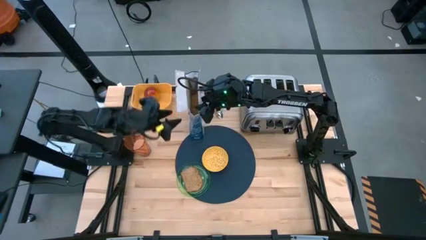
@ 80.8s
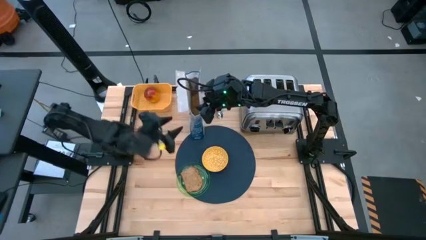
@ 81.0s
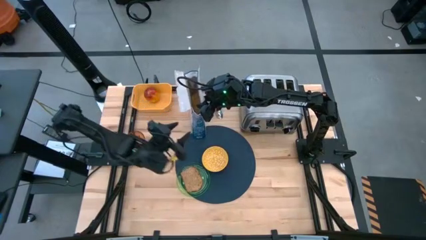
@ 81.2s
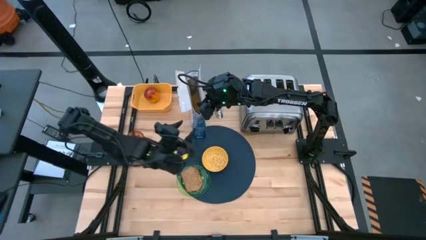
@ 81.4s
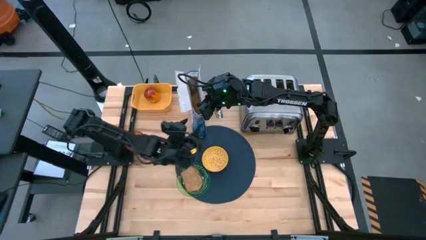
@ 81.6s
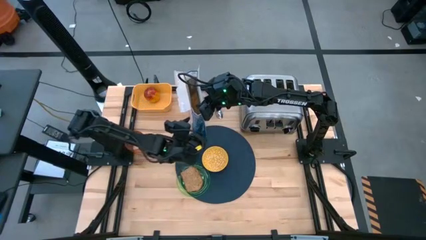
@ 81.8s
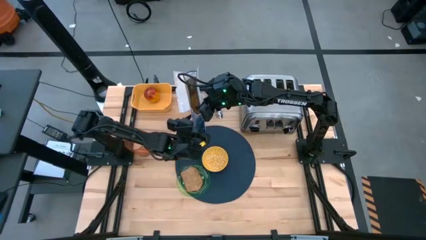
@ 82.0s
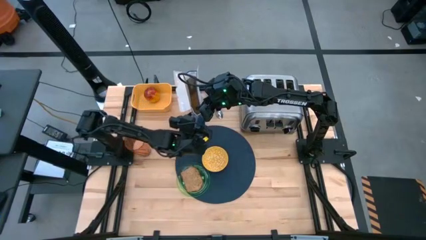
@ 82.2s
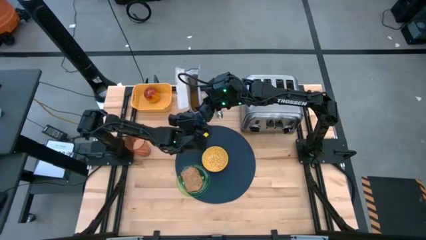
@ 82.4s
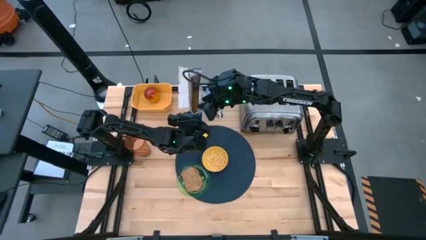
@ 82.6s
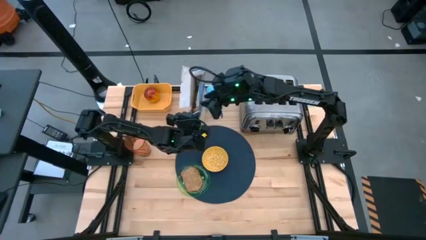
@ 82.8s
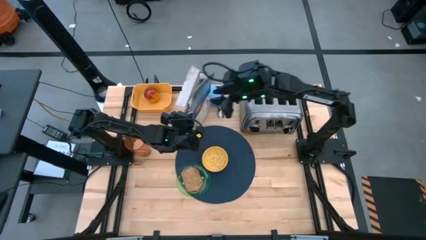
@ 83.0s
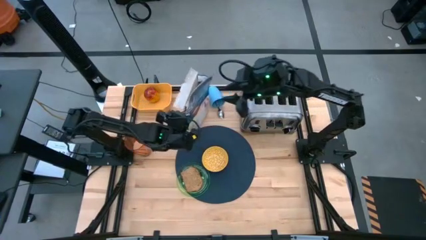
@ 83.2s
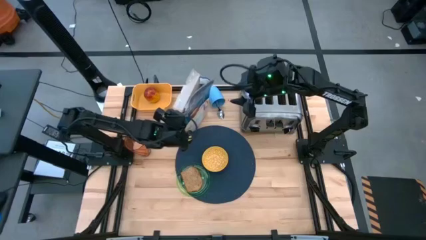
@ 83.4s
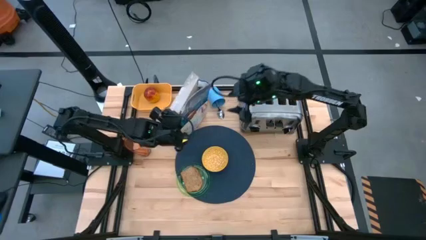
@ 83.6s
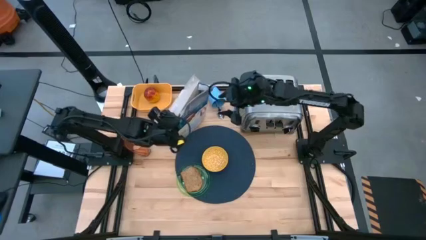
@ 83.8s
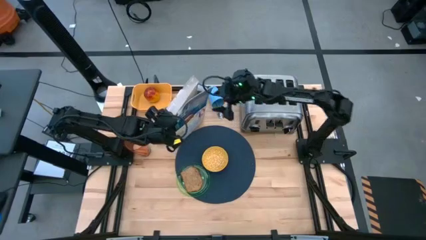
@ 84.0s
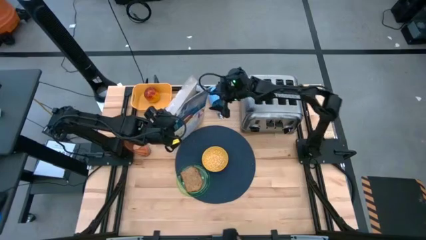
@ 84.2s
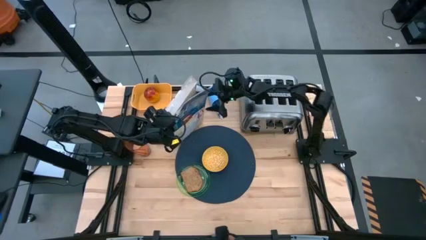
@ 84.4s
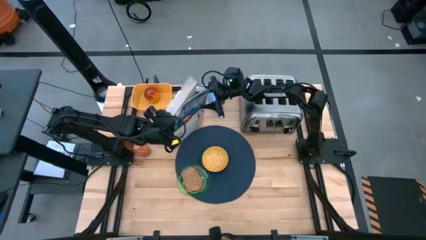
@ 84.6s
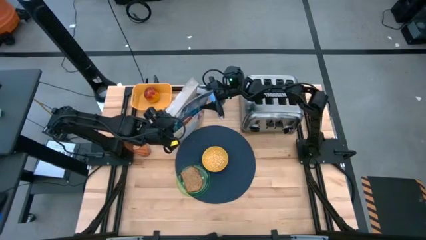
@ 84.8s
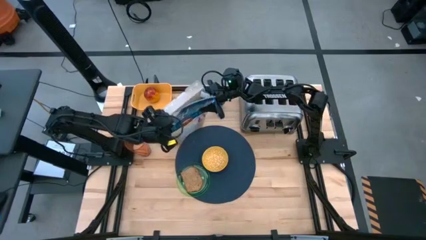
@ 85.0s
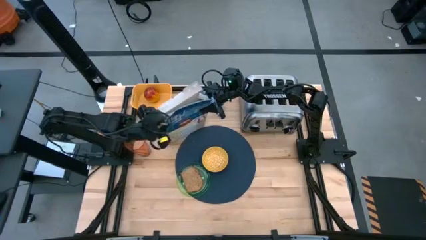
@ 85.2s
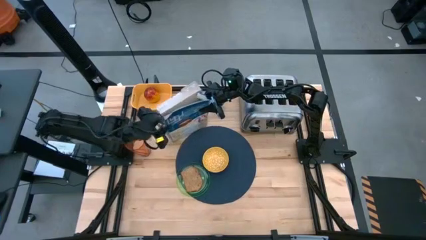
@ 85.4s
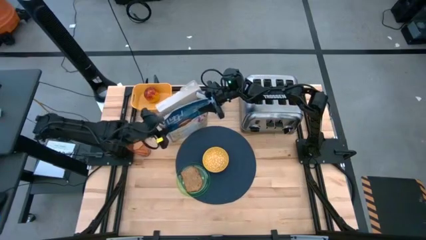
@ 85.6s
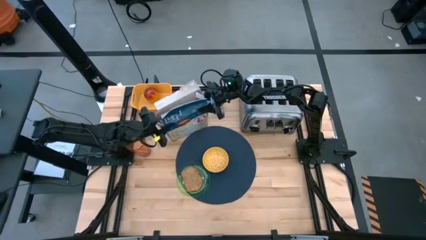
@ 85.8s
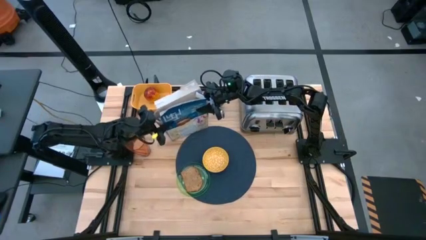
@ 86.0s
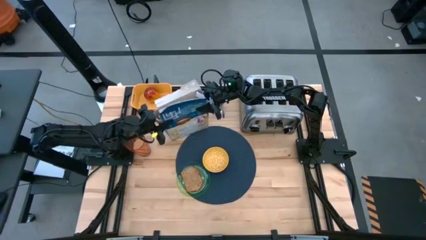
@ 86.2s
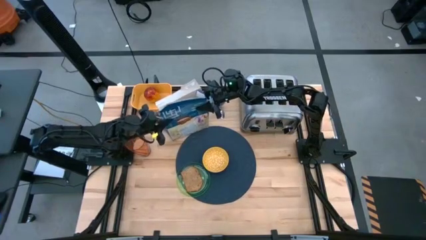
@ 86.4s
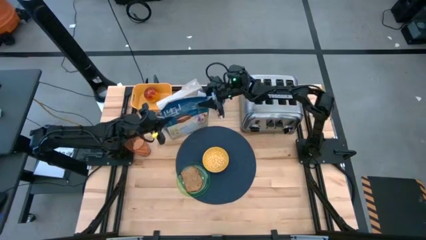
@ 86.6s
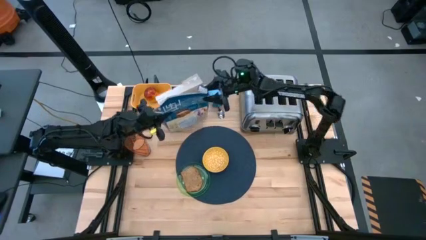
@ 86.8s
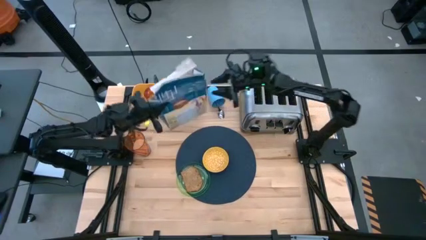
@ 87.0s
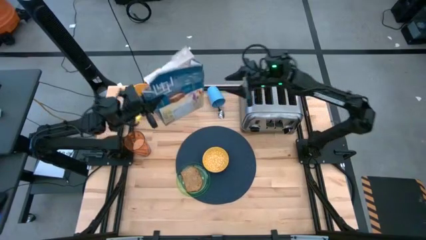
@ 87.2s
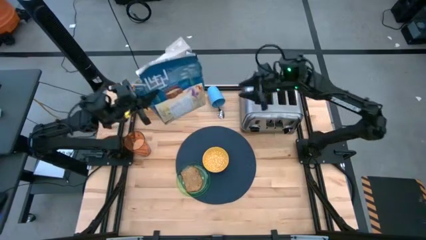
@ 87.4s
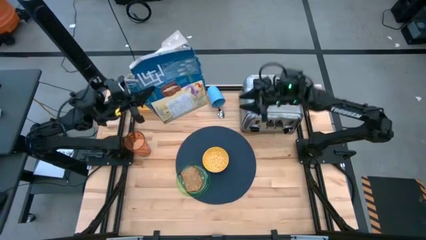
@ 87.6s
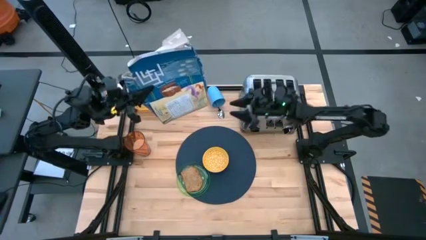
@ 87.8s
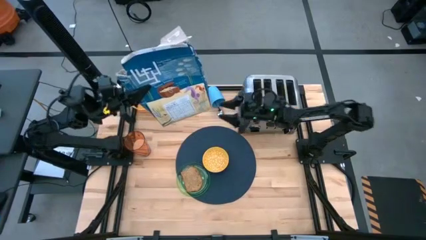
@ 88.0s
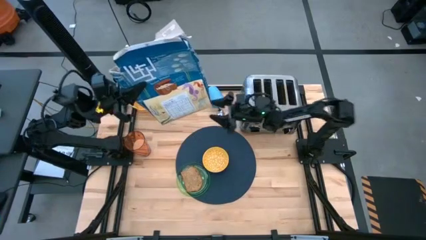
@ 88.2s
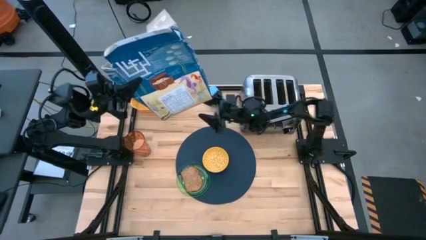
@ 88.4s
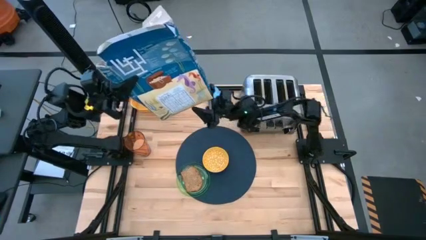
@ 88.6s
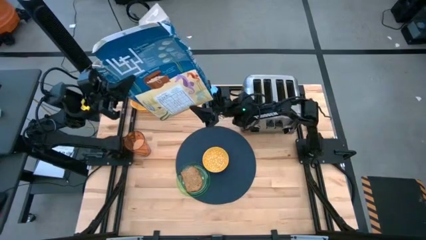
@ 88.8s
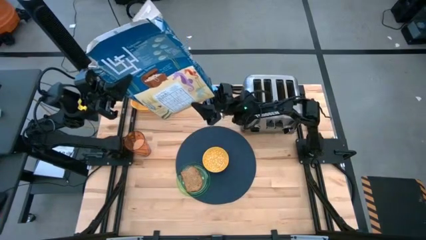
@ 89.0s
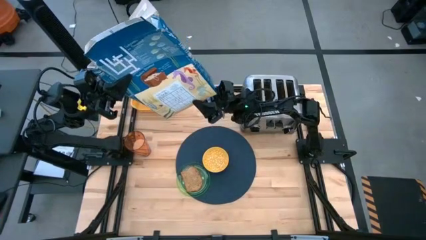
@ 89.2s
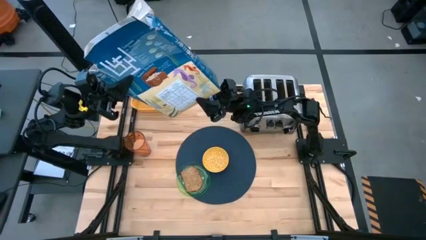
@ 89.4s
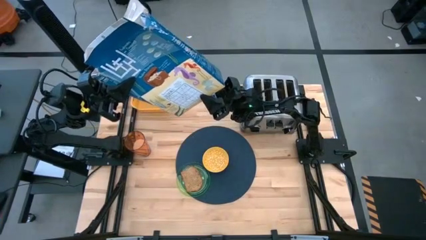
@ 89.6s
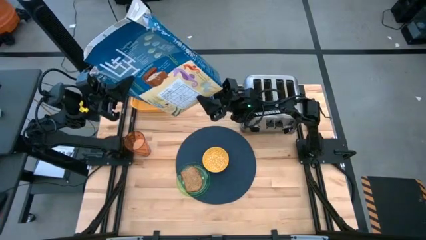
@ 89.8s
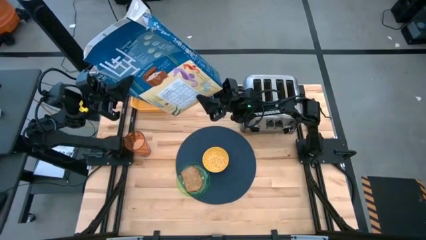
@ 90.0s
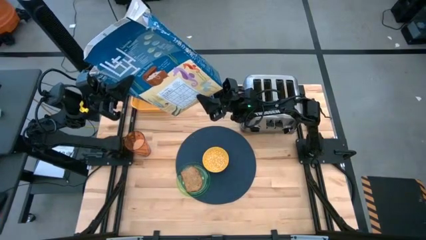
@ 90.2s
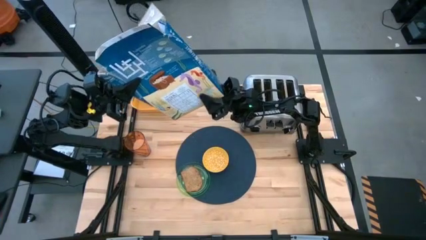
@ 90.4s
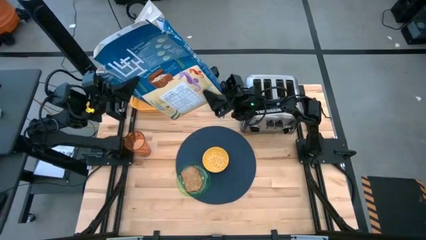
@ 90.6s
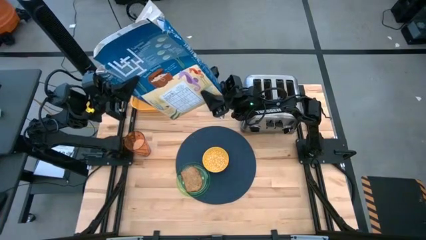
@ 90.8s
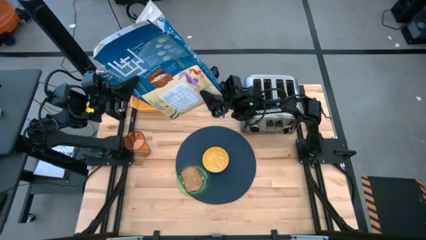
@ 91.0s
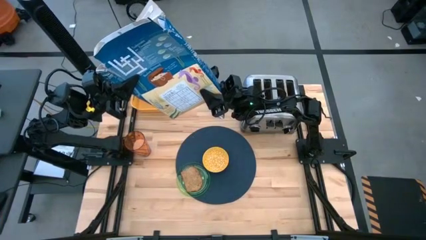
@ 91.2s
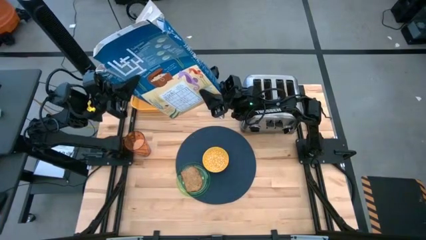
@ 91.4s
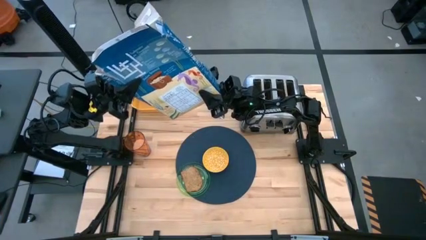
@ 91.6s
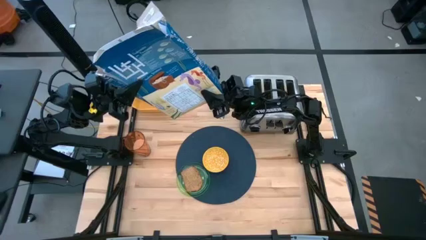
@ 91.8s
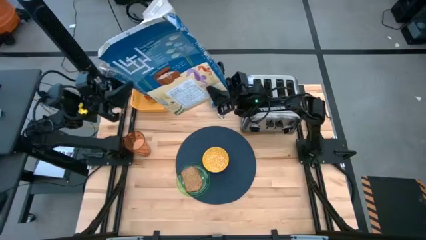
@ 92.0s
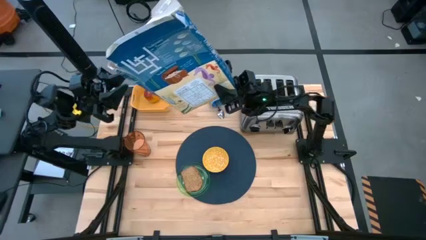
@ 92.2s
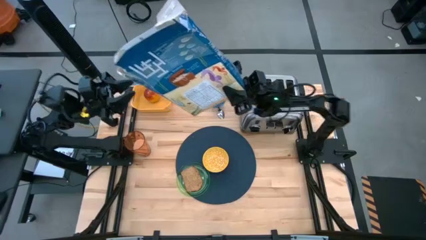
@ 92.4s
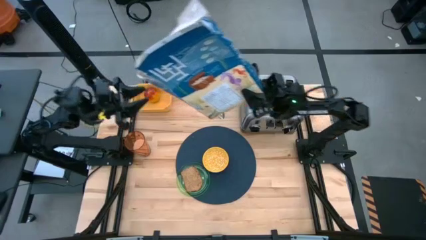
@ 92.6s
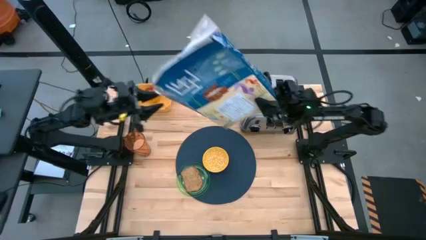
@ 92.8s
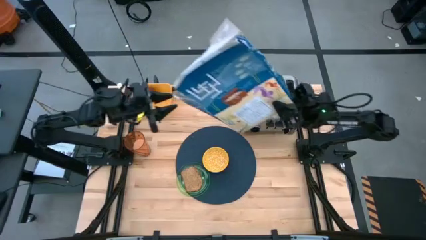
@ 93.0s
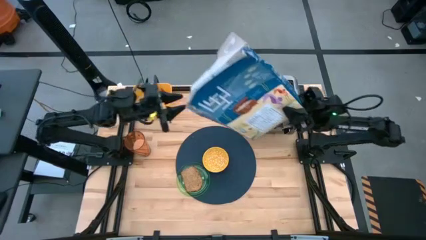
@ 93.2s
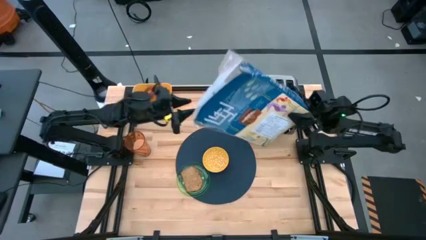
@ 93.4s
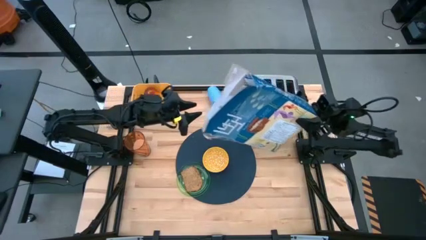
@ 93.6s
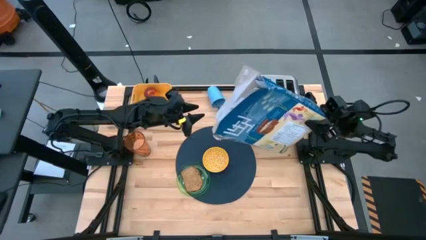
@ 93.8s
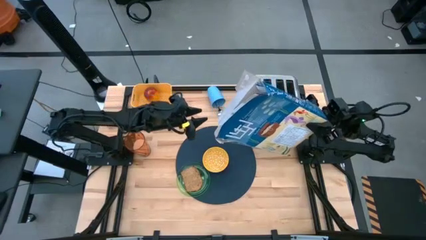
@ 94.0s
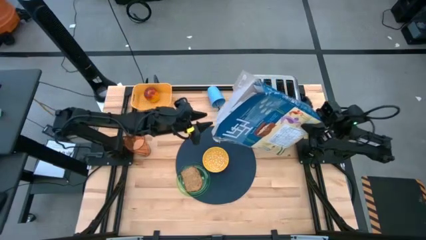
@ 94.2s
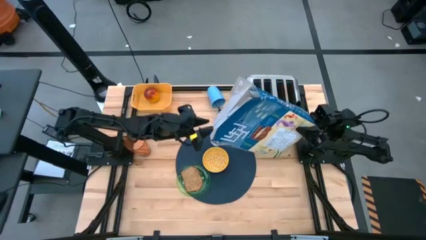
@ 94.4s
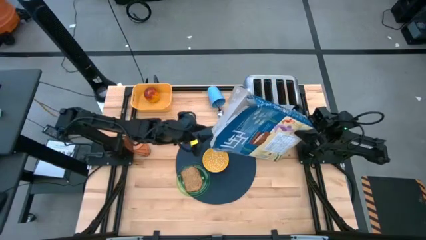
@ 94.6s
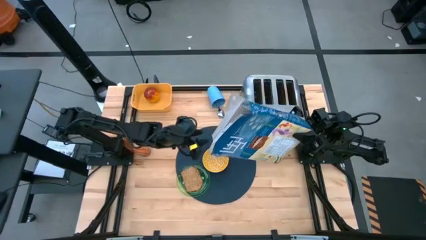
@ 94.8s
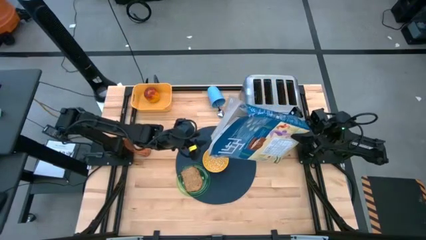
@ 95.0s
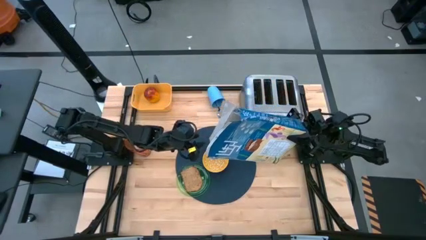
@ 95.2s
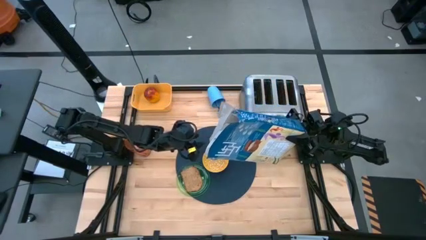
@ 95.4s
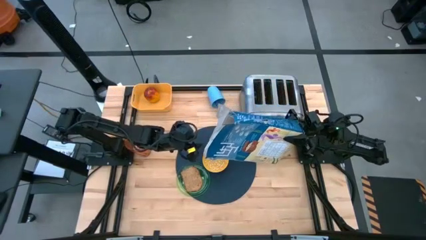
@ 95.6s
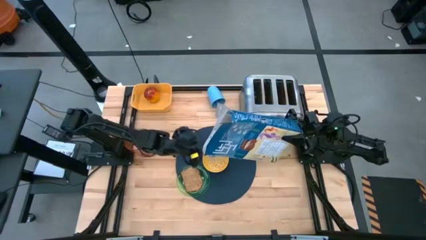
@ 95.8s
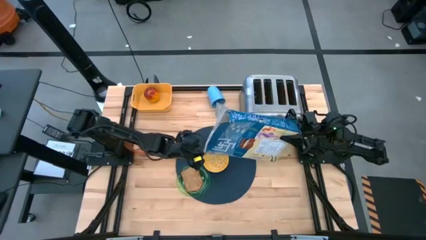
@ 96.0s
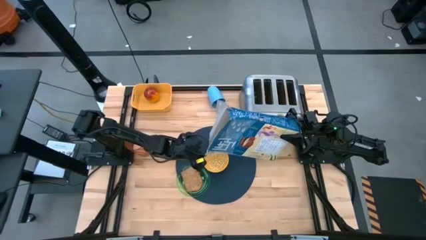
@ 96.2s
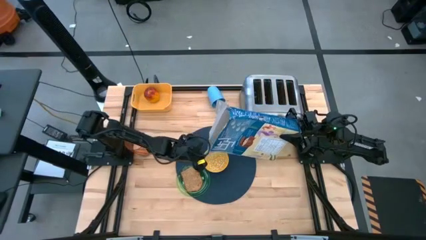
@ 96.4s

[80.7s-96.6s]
Task: Arrange a breakfast setting
Pour the cereal in the yellow bowl on the dark blue table mat
